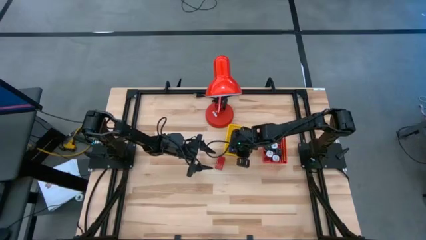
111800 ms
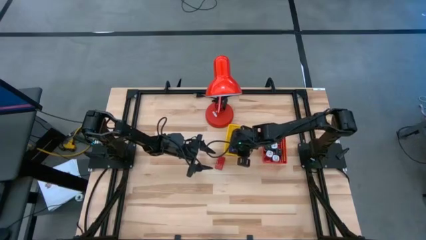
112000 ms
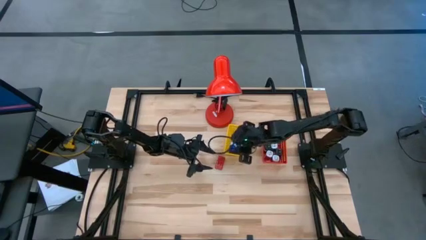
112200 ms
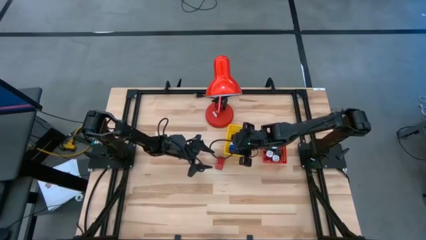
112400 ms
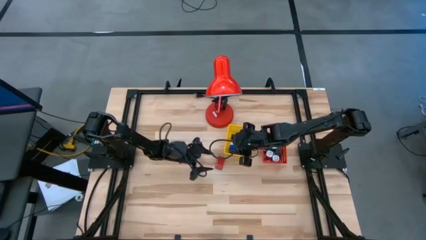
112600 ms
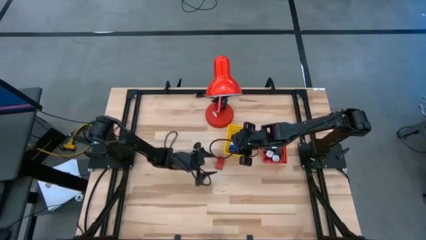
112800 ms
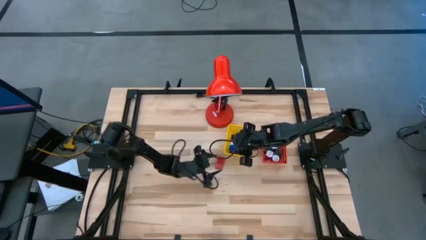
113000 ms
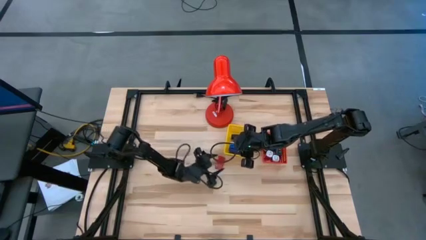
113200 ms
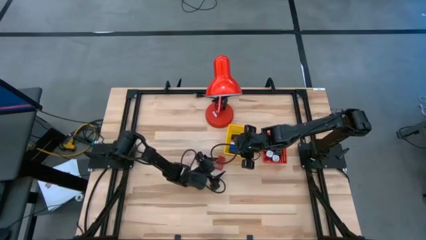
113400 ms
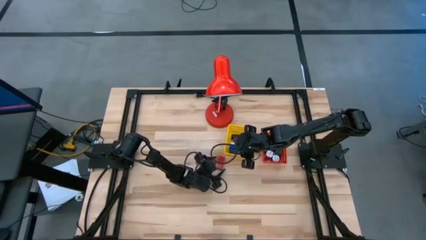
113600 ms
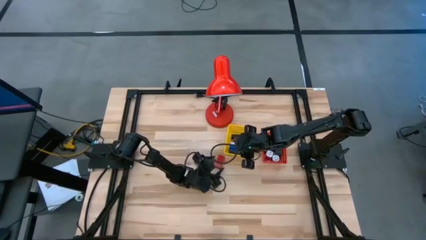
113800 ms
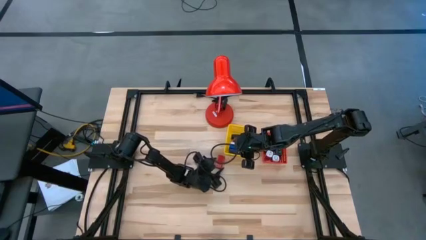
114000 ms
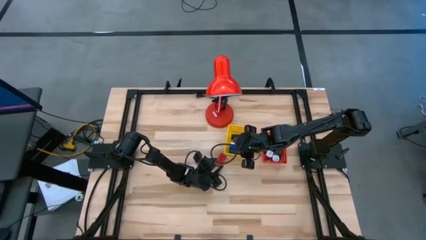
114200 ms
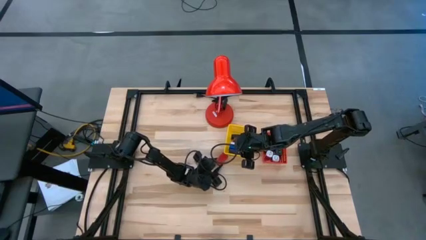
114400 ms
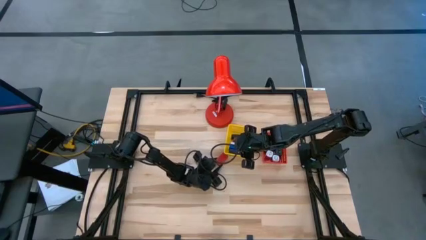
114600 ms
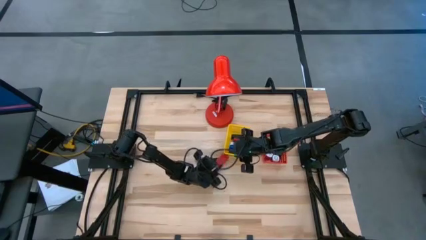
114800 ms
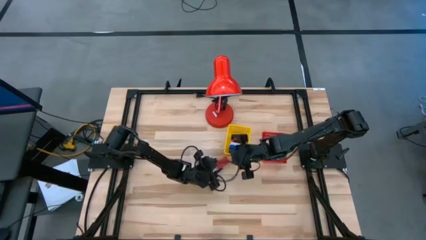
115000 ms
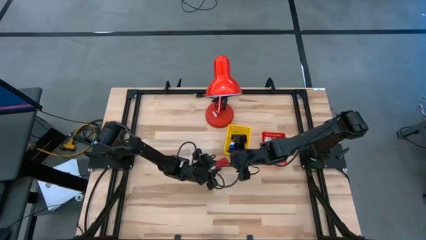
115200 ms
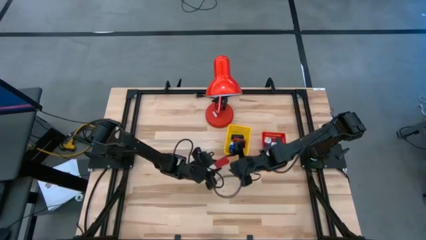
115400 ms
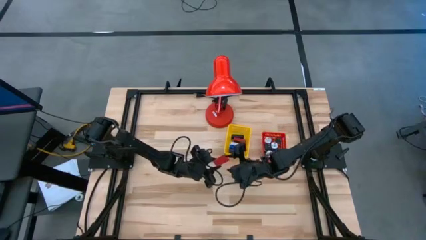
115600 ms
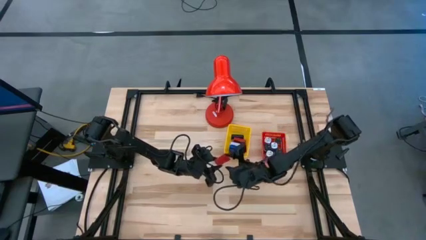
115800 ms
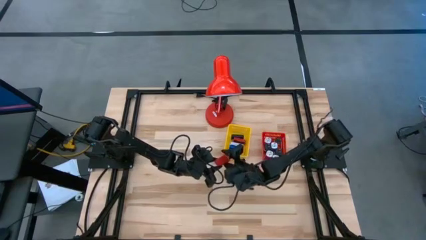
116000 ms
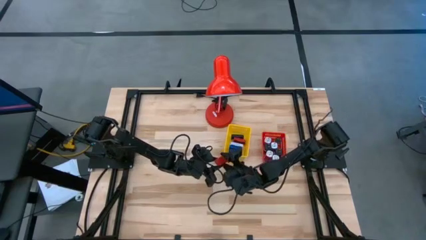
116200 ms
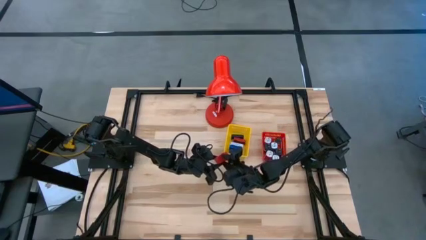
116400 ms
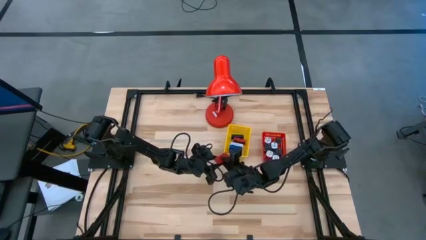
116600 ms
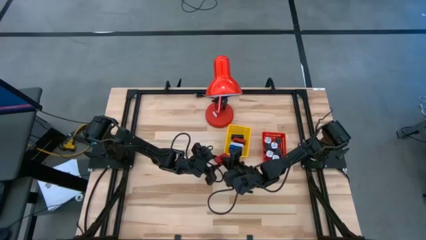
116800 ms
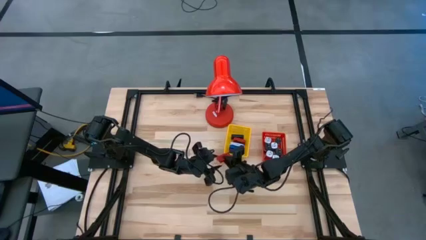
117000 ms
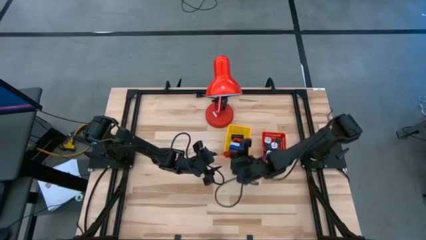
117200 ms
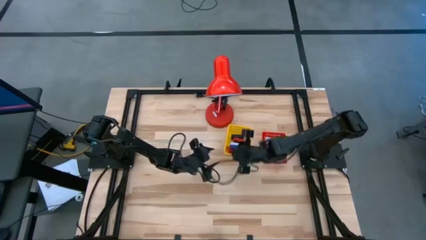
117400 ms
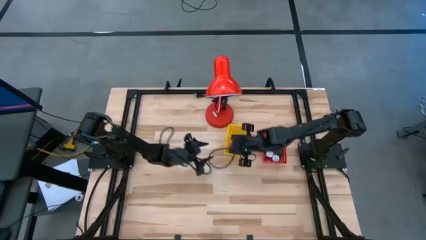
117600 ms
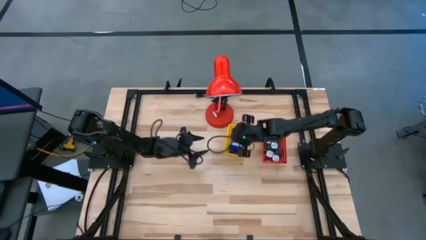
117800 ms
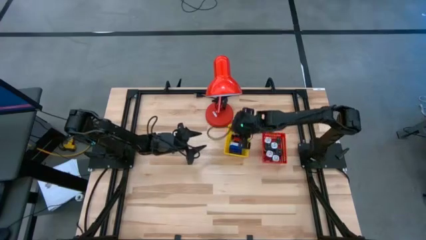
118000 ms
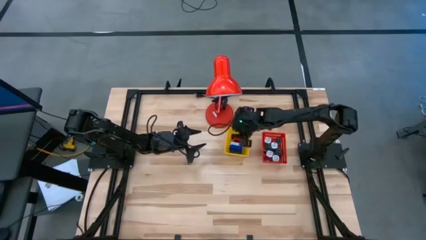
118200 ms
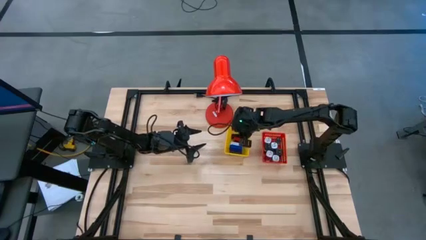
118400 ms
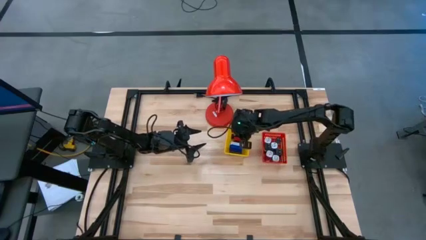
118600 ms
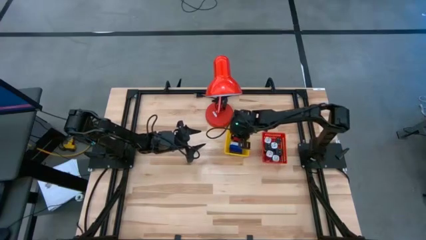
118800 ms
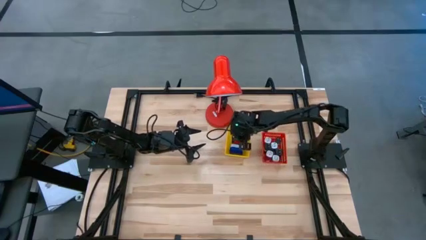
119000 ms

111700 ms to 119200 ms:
Task: Pick & Place Office items
Put the red digital clock into the yellow bin

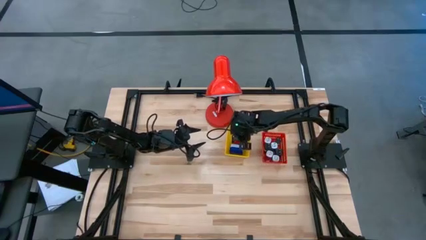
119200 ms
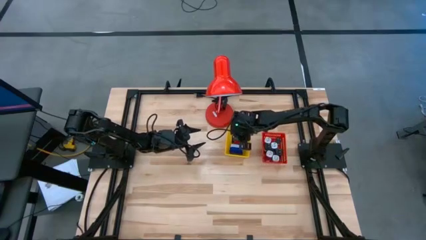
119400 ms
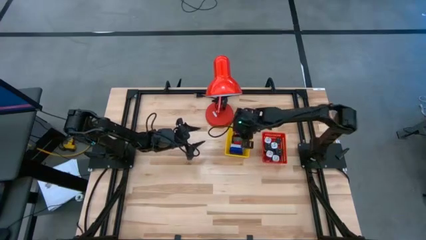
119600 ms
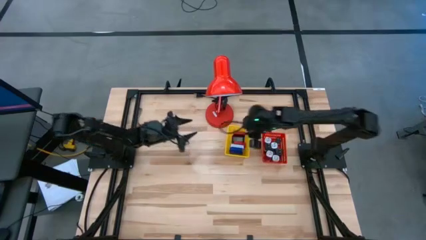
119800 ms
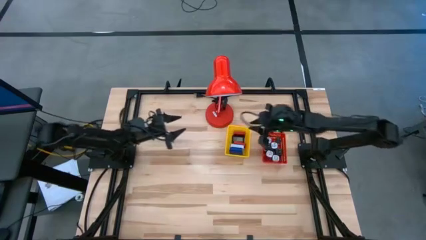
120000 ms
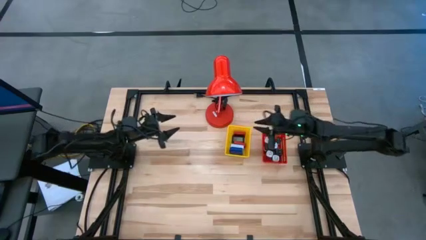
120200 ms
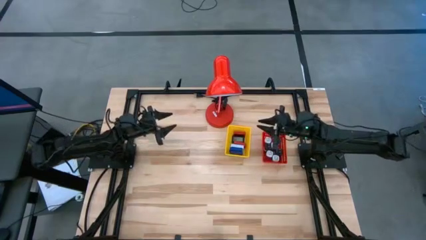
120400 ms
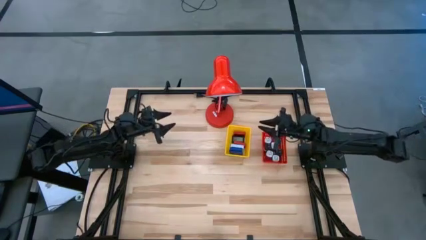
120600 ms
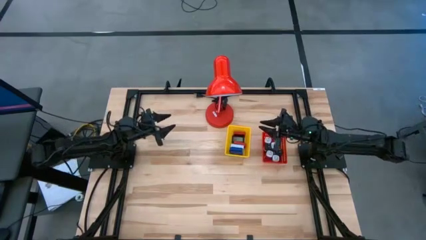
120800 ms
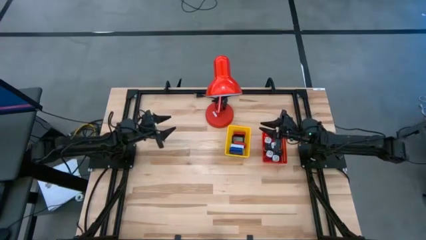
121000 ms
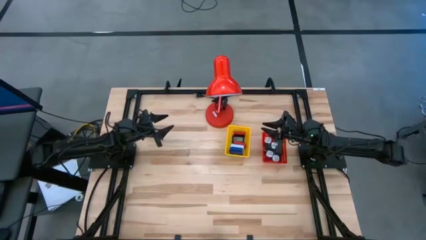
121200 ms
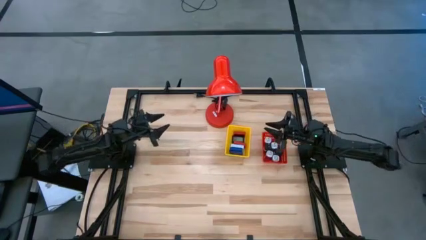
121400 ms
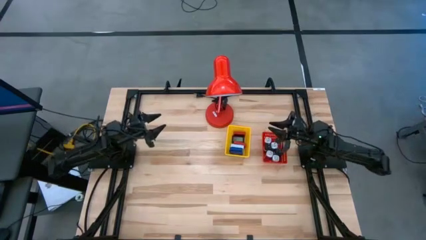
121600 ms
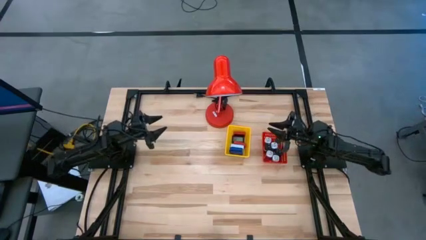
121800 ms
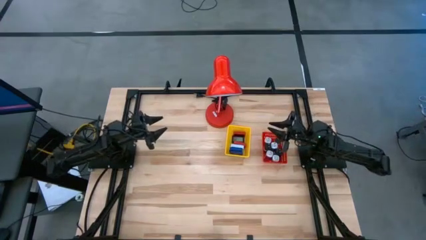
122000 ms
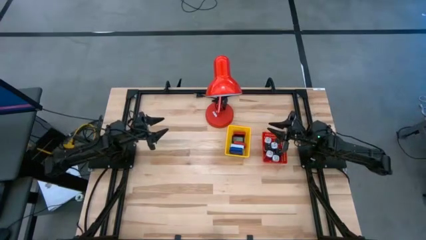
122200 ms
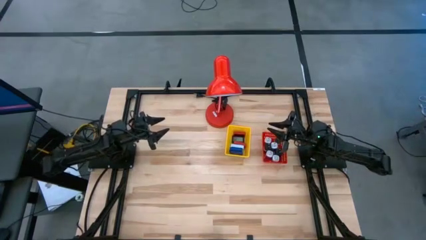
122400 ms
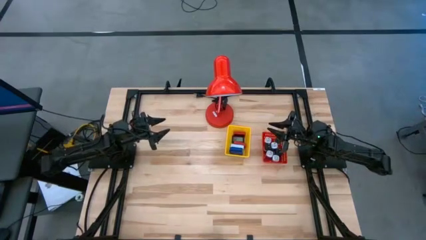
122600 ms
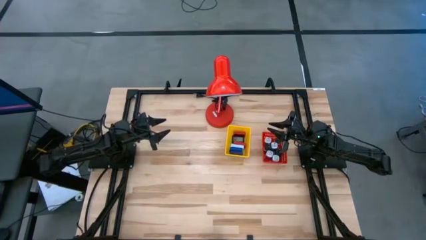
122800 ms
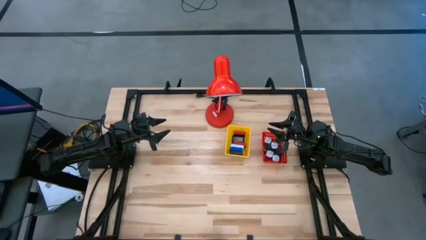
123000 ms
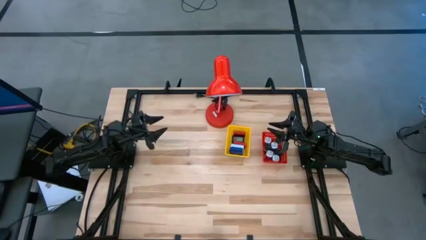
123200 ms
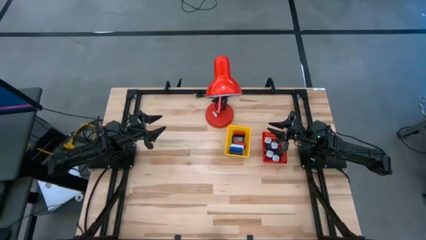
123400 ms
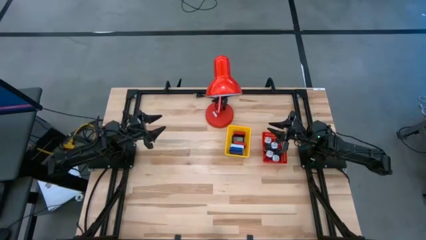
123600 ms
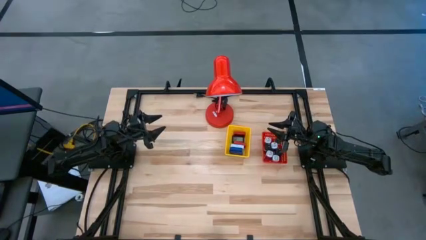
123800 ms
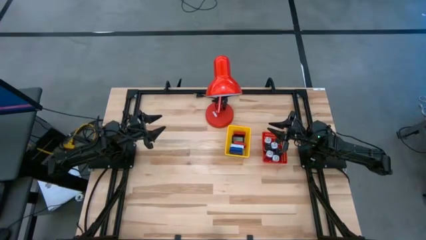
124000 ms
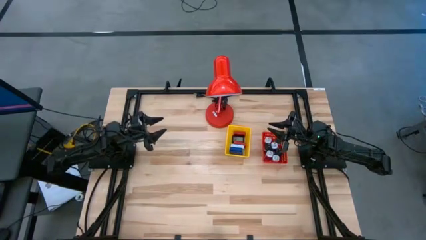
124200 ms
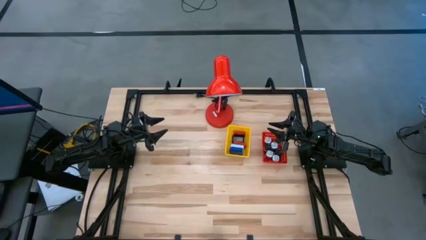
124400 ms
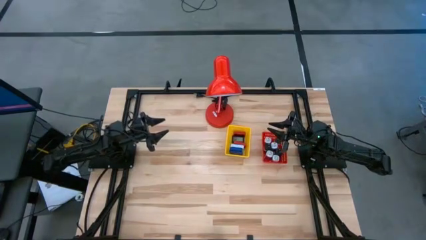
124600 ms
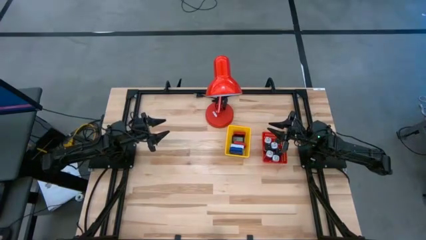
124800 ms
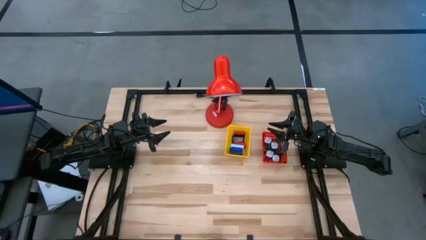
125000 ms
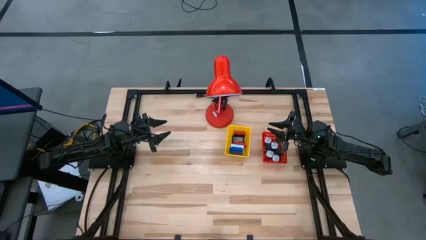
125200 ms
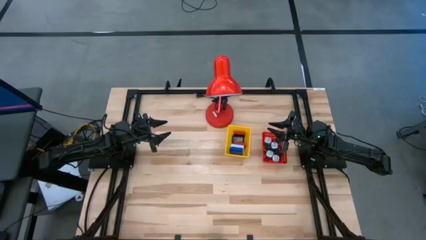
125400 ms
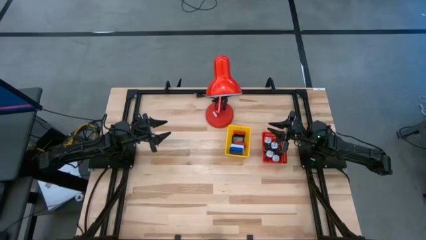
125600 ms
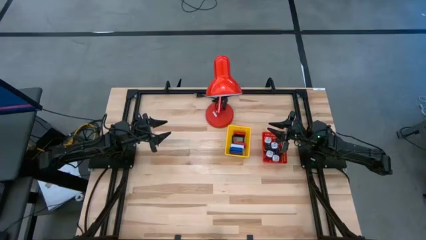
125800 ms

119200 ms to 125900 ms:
Return to Home Position

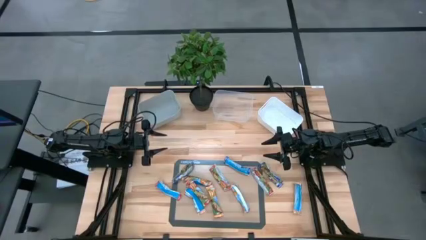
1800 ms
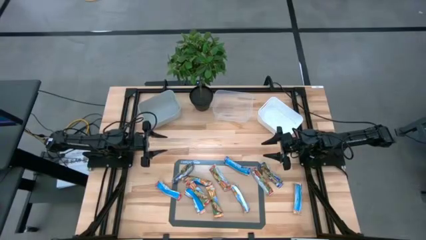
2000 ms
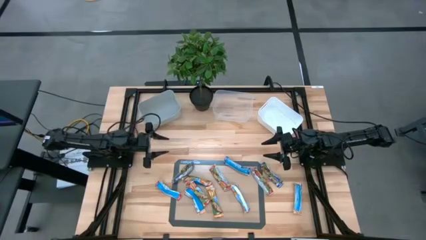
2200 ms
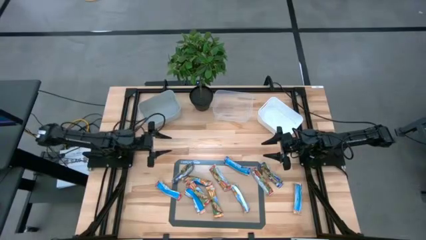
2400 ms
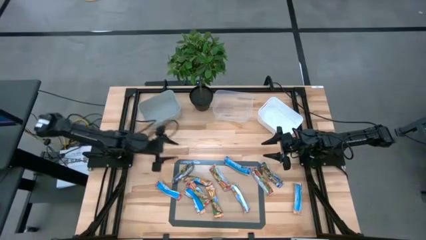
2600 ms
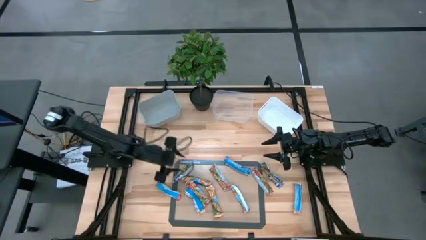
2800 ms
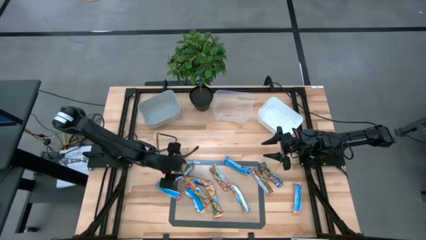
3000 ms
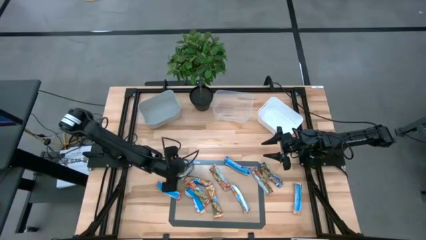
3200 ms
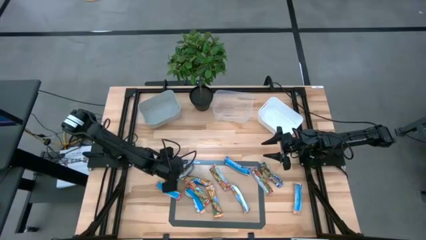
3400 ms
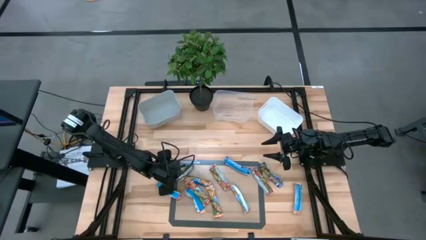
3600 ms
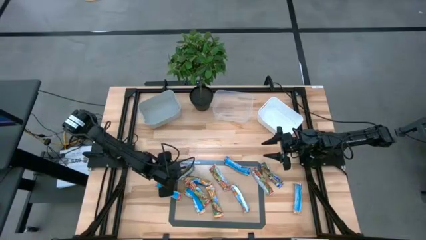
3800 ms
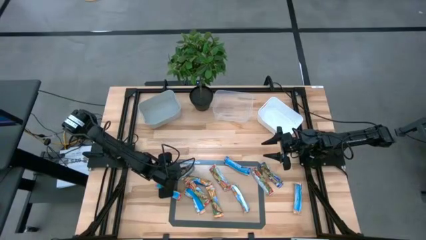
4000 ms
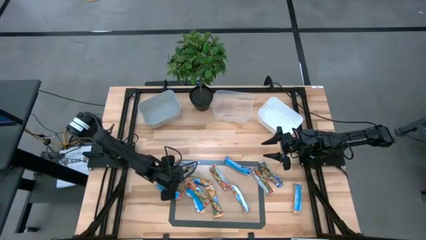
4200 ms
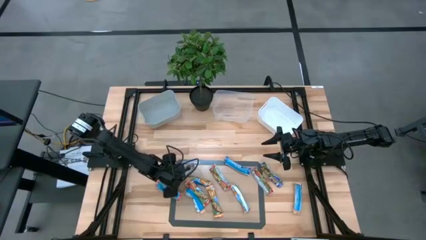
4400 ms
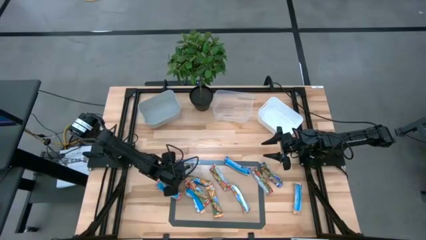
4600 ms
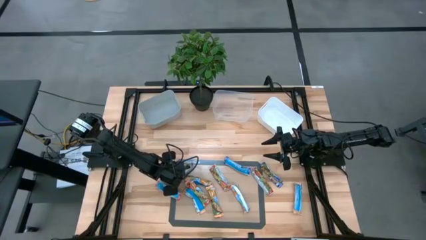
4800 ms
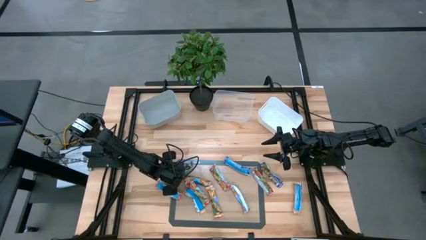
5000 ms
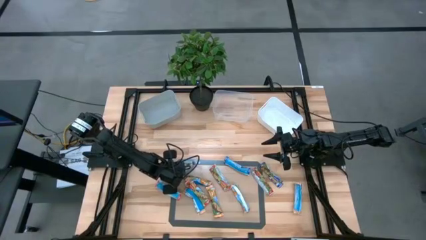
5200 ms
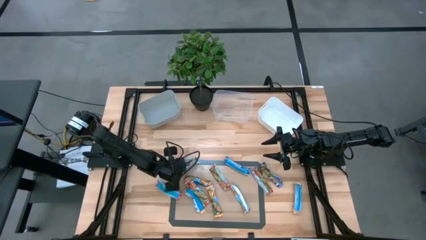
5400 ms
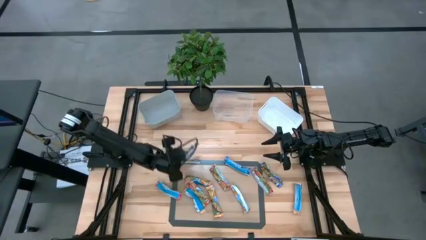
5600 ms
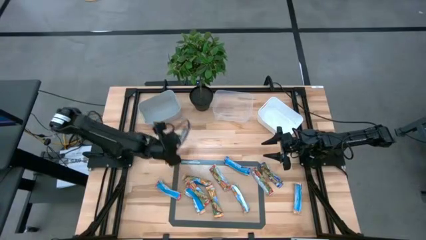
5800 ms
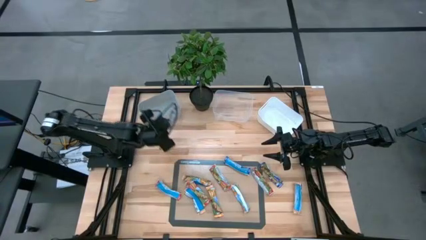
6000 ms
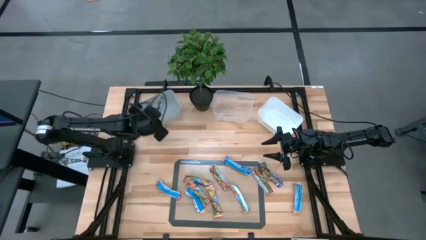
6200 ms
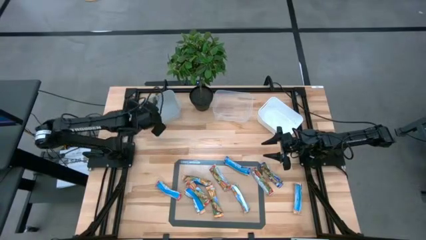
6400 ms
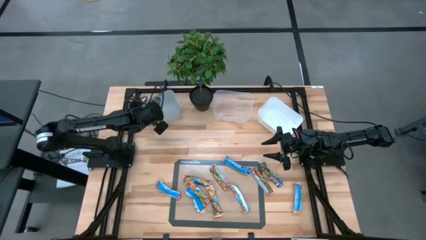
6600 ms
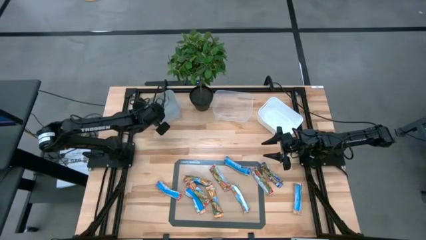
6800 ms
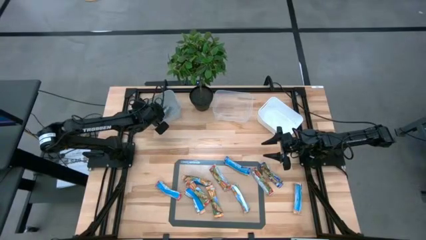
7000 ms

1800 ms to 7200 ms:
Task: Pick and place Granola Bars by type
Put the blue granola bar into the gray bin
